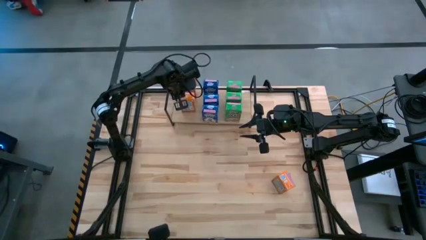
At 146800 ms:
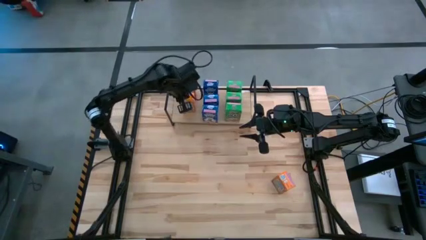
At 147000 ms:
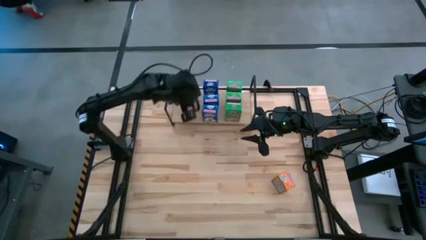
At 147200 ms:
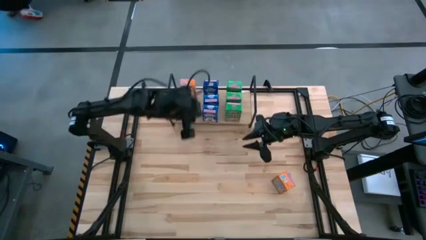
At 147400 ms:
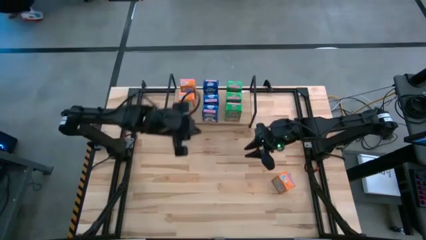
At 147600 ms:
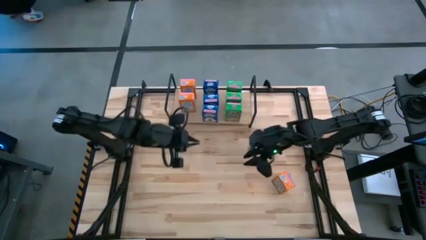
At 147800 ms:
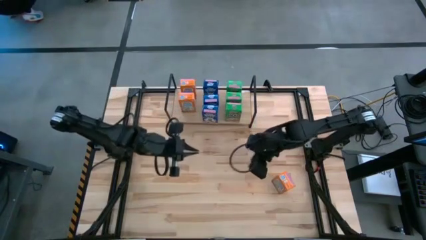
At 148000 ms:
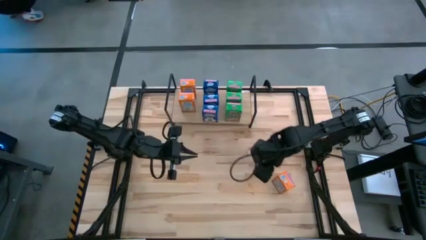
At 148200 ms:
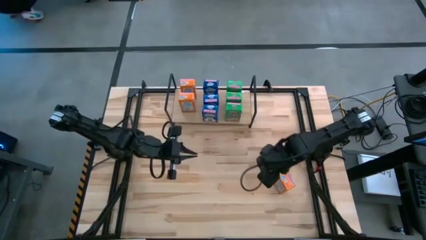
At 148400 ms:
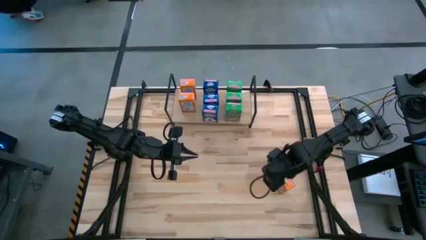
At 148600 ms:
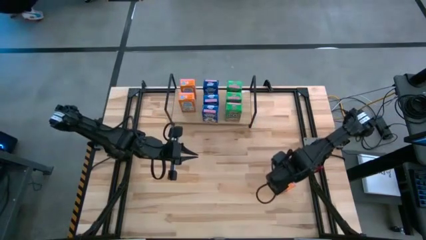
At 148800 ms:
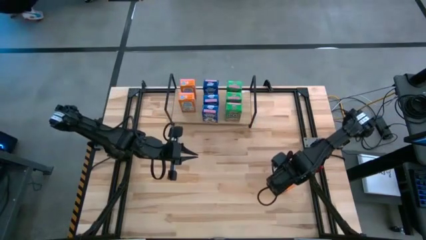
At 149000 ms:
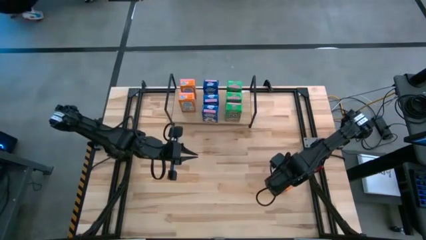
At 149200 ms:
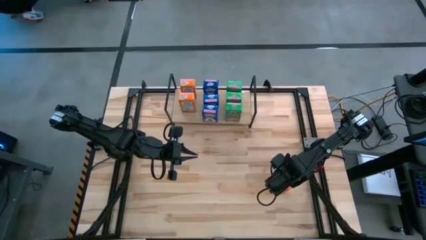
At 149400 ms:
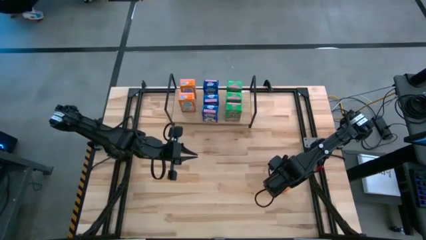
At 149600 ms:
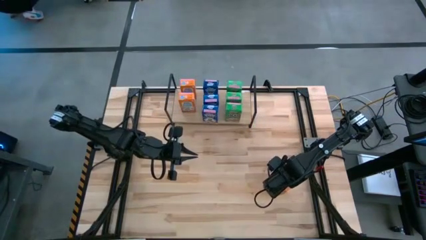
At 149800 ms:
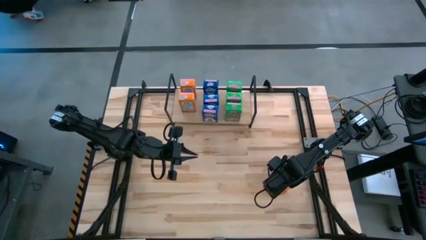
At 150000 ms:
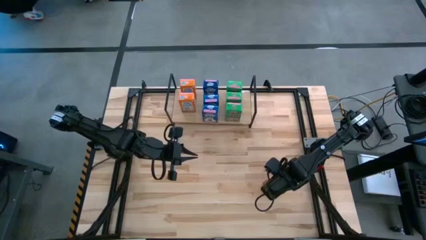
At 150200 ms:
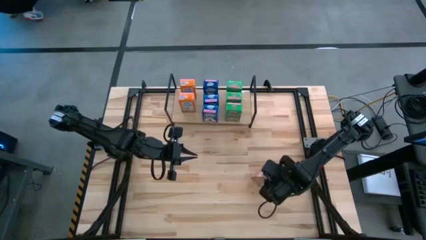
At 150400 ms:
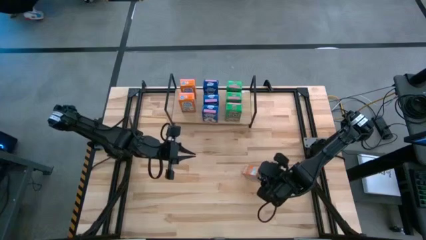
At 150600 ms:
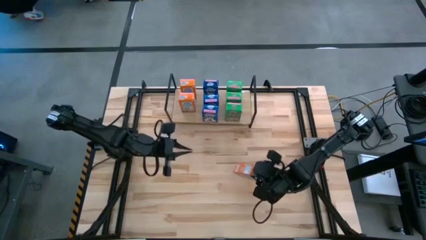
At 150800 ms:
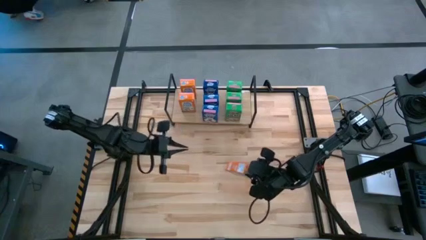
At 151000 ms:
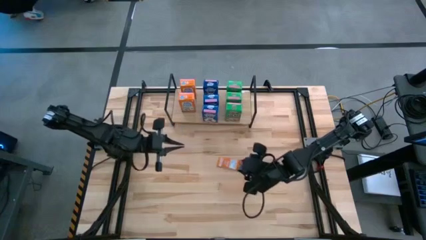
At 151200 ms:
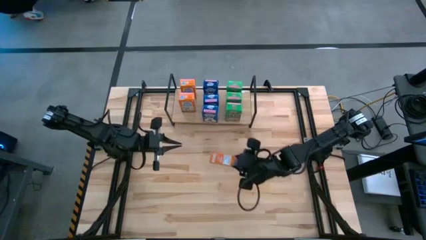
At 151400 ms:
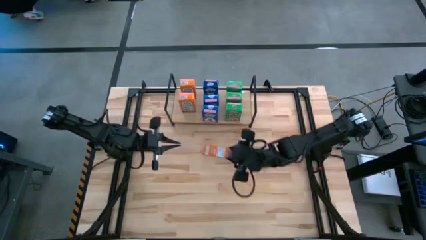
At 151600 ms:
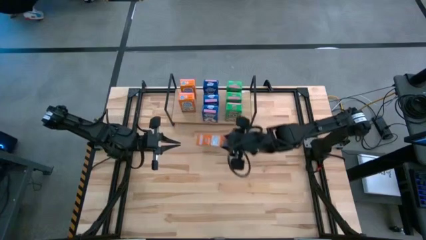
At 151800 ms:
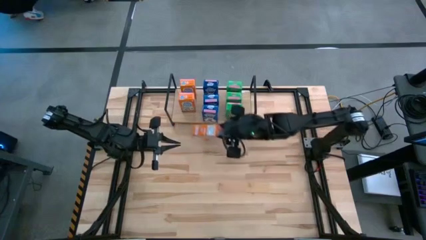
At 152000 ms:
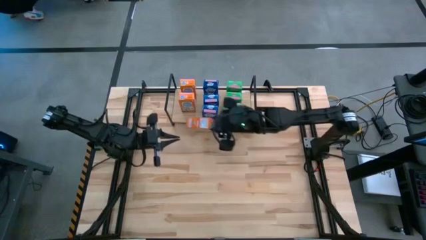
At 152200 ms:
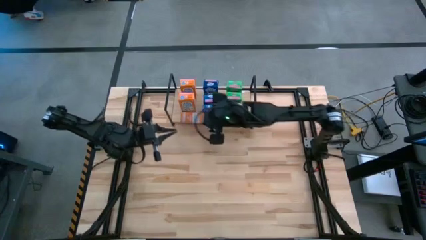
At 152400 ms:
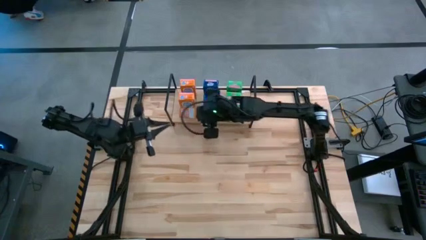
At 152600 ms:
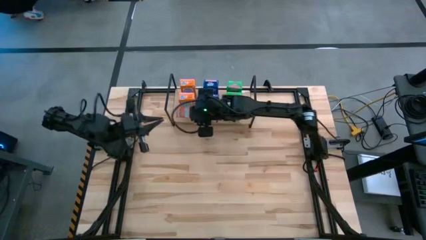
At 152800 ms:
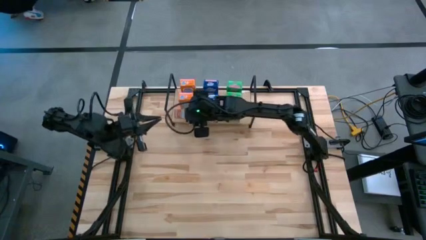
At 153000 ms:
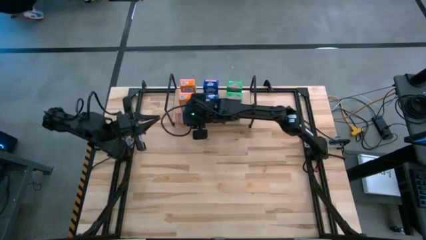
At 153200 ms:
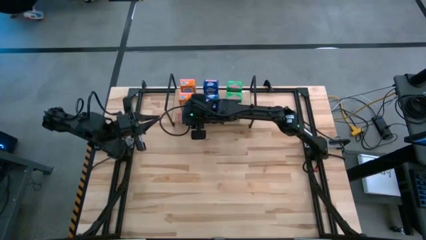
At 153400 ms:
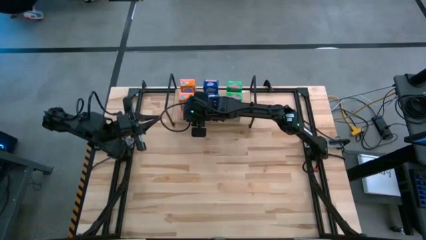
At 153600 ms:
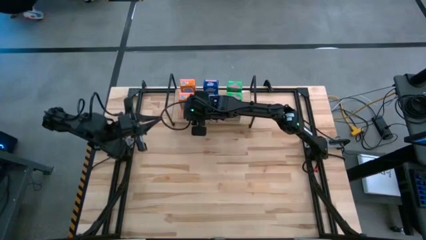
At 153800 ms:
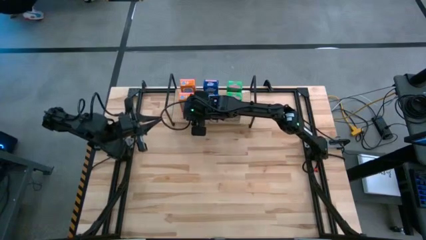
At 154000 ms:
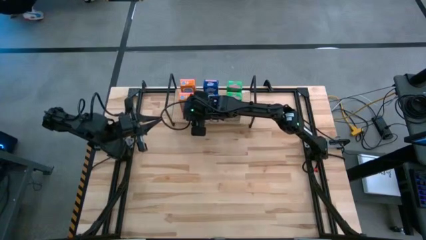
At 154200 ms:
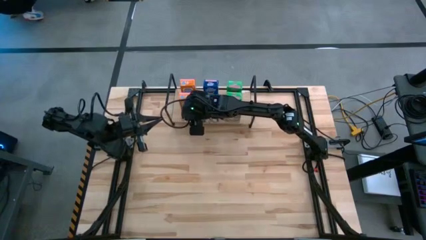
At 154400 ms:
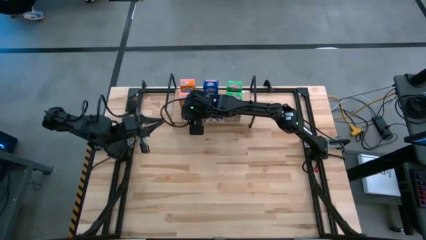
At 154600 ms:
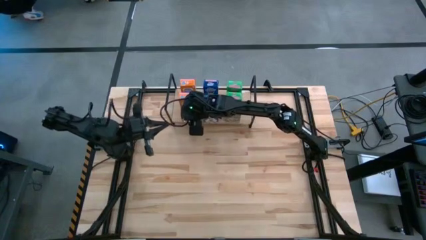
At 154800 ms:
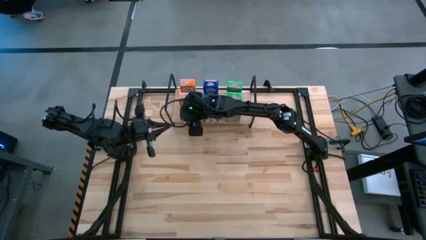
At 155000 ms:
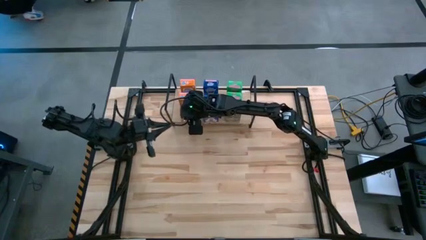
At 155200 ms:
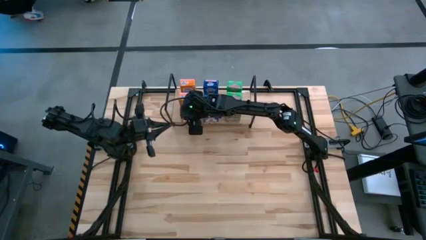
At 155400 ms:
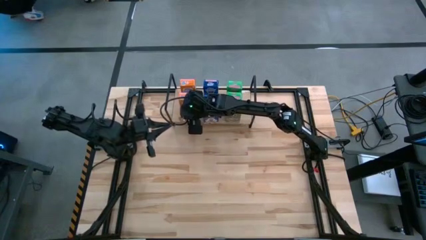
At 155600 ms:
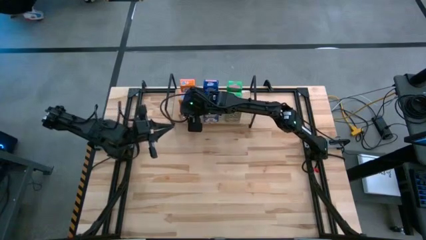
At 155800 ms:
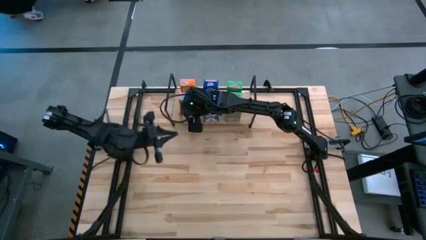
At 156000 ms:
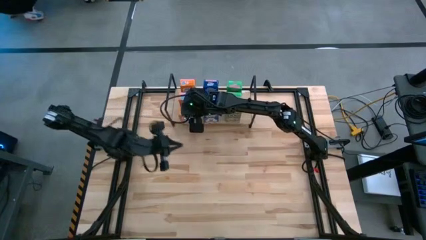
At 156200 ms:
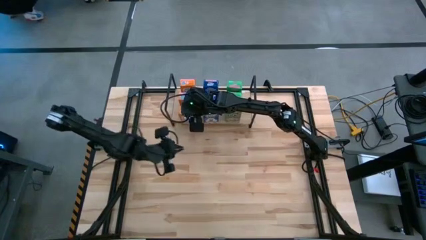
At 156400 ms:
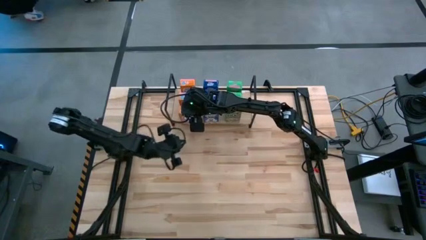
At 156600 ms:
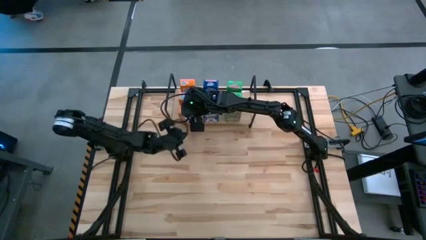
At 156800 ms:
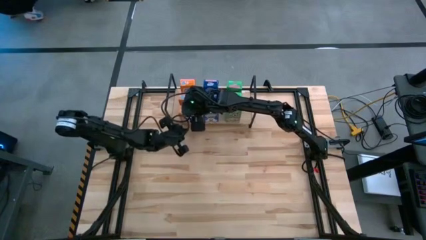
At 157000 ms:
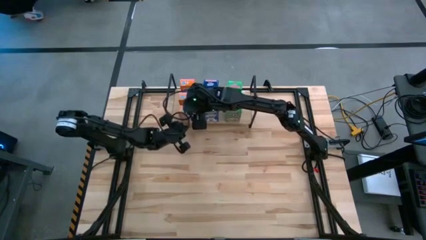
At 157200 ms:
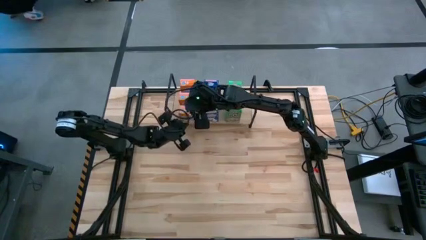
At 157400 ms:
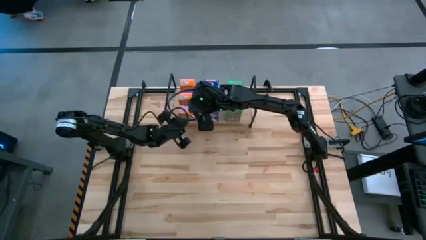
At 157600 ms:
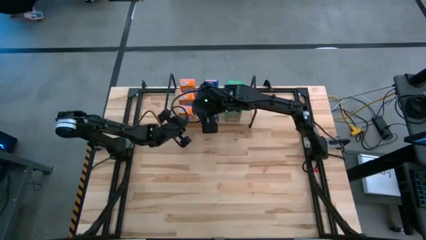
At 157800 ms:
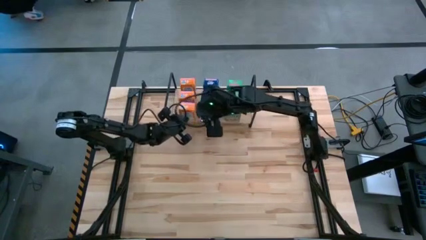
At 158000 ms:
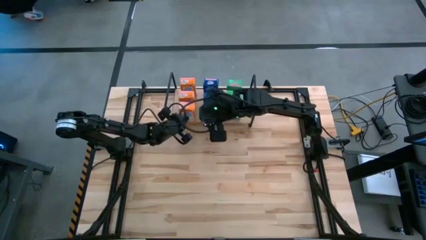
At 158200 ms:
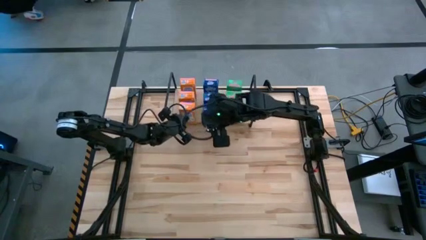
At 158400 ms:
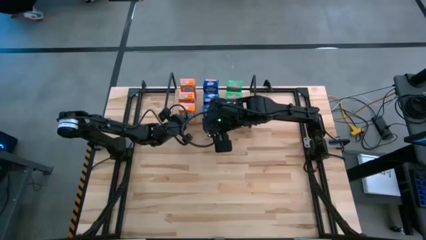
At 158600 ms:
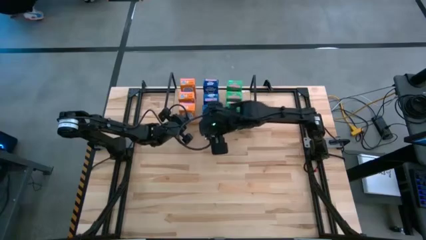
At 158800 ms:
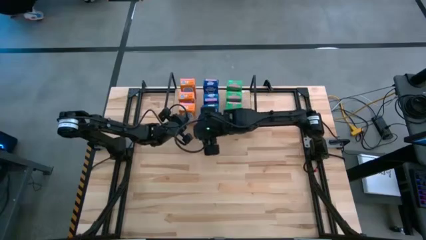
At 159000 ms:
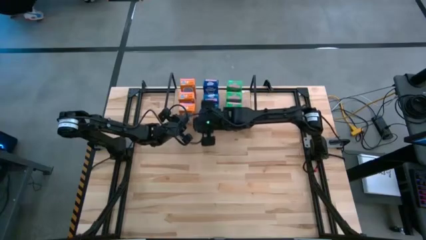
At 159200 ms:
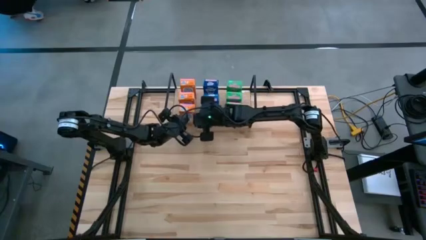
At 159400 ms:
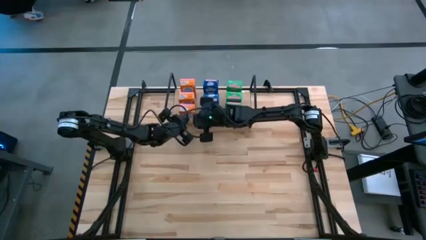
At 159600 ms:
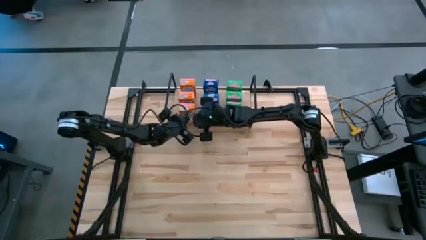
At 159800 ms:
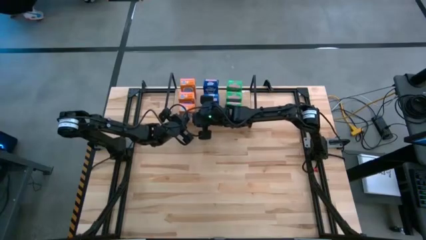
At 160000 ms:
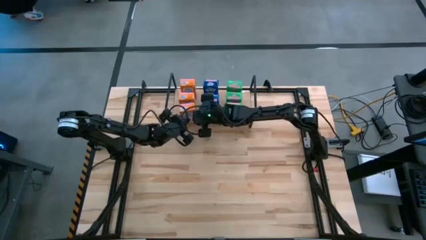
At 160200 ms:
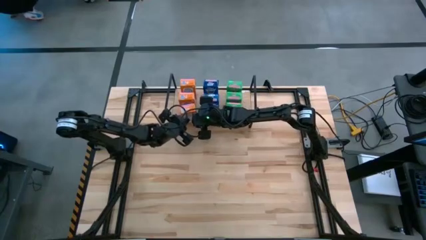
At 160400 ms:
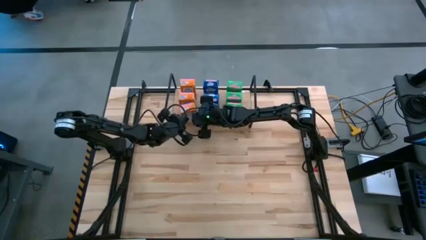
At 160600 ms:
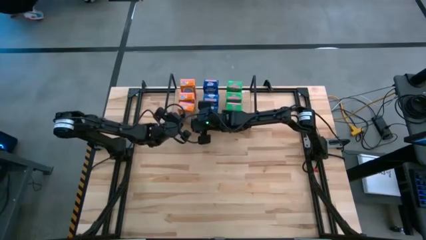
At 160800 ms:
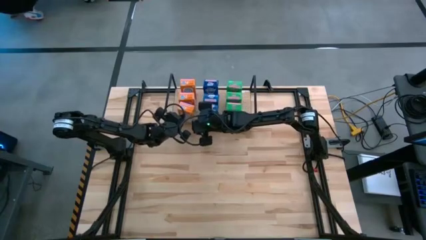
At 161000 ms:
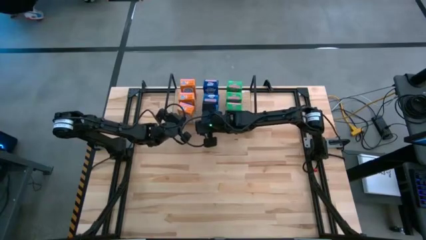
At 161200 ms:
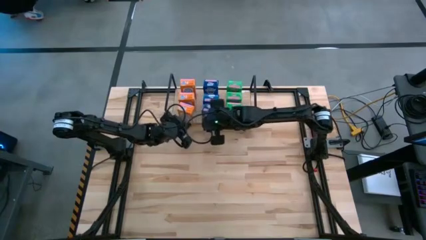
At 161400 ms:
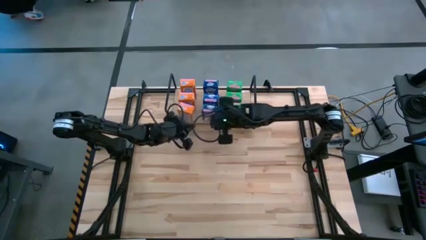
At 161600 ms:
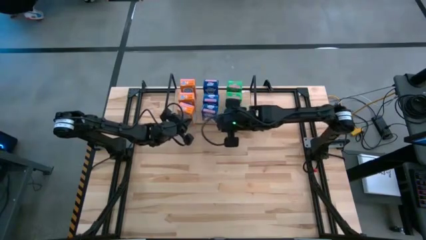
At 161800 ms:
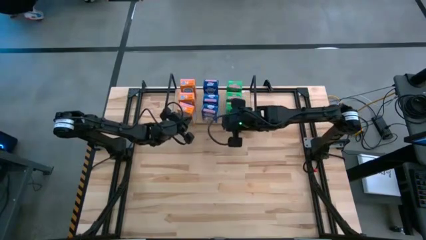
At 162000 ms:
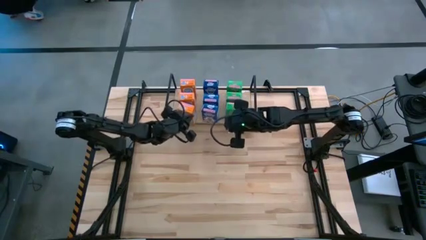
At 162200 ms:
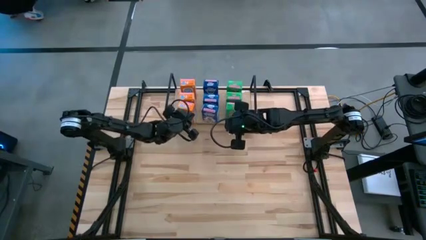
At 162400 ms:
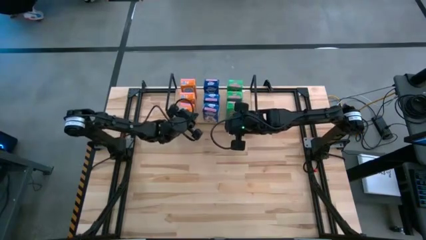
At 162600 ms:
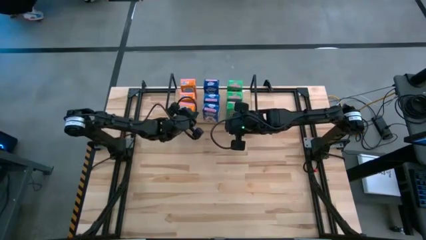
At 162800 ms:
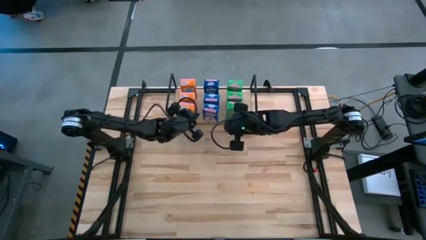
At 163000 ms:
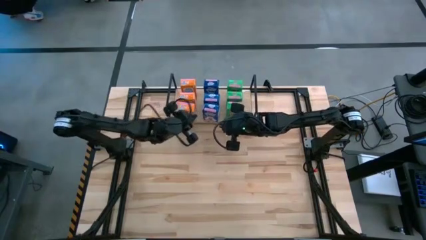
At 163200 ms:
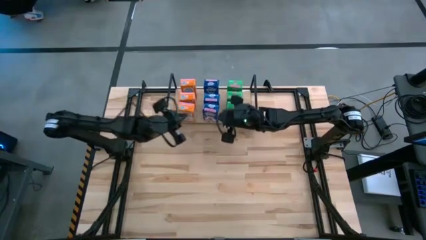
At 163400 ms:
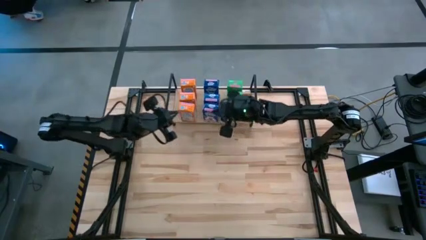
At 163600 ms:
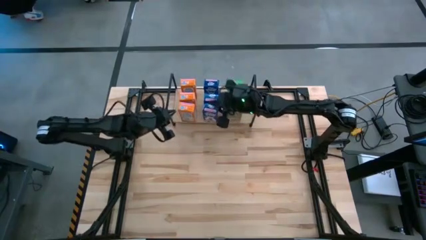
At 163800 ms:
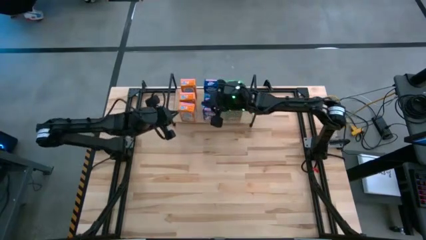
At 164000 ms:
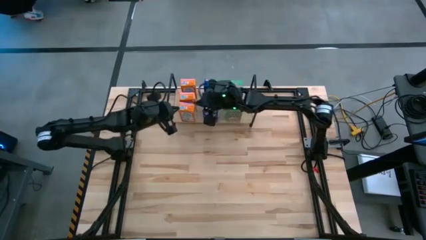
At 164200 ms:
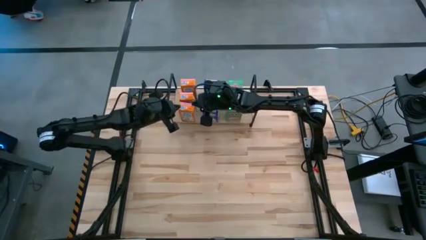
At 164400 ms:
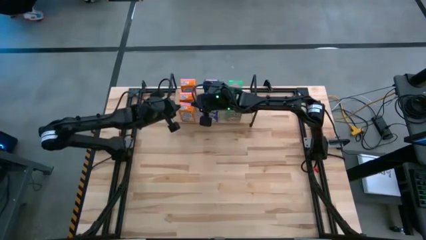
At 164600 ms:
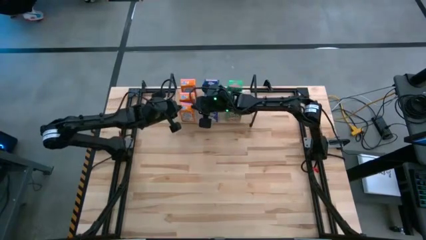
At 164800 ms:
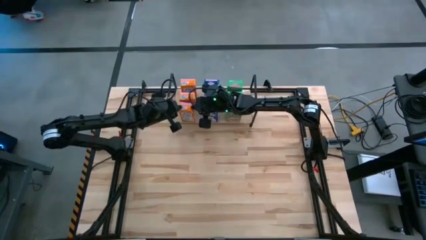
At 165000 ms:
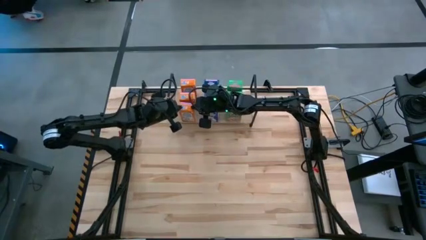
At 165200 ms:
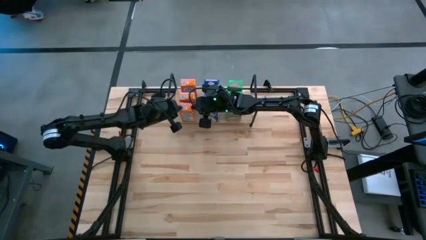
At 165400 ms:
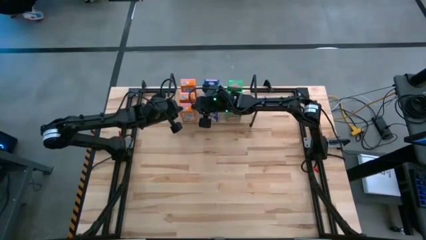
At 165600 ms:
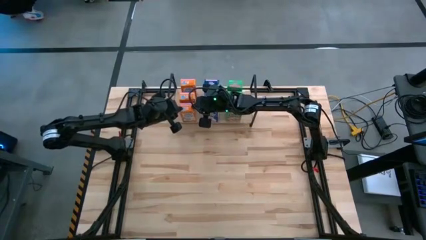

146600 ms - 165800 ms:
Task: Stack cereal on shelf
Put the orange cereal box on the shelf
